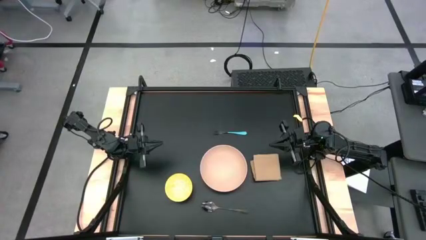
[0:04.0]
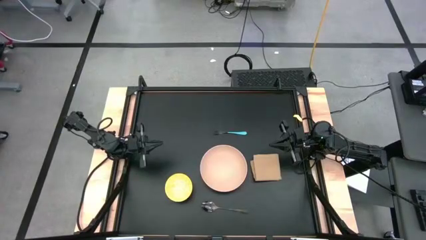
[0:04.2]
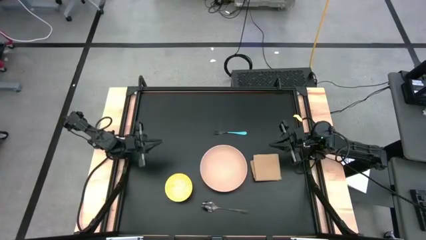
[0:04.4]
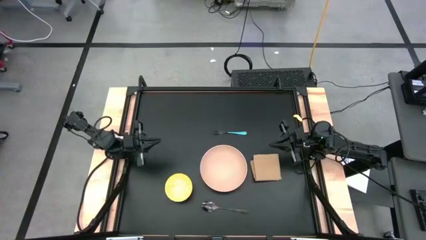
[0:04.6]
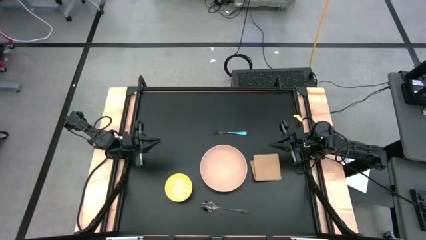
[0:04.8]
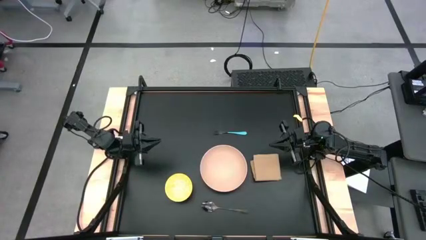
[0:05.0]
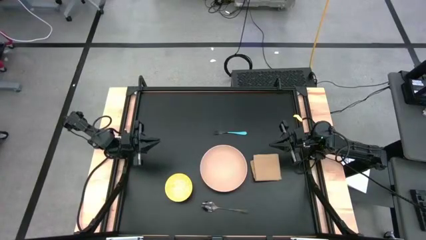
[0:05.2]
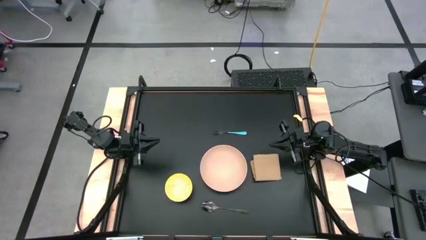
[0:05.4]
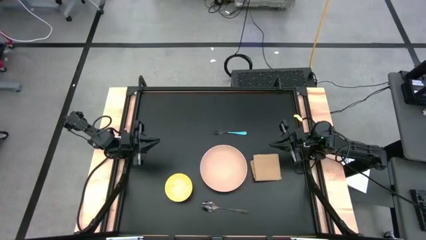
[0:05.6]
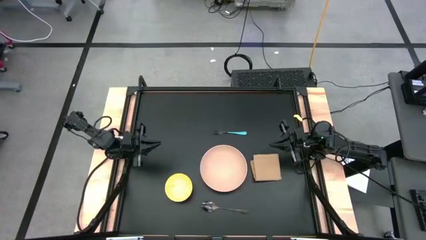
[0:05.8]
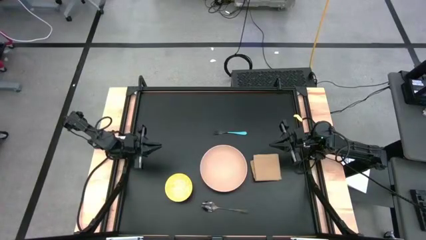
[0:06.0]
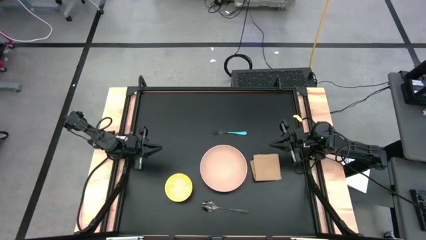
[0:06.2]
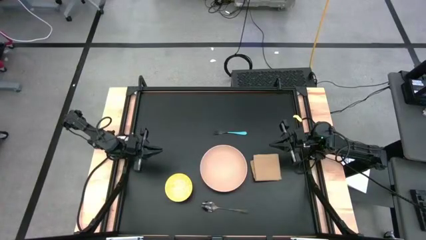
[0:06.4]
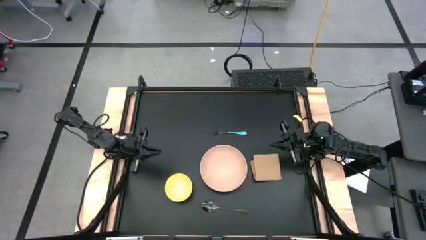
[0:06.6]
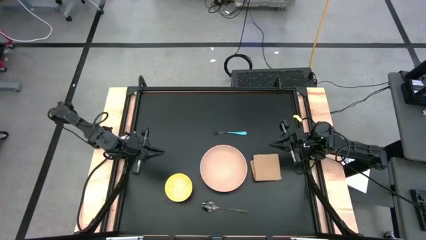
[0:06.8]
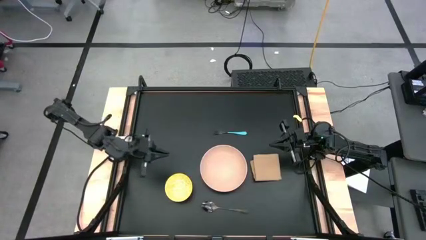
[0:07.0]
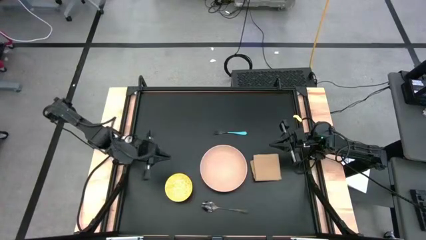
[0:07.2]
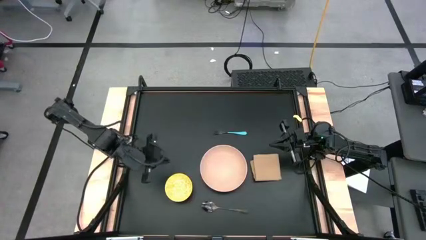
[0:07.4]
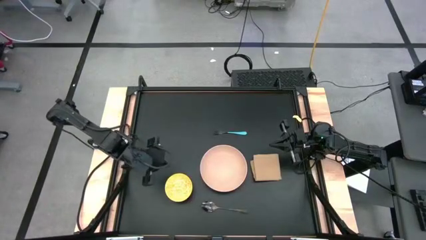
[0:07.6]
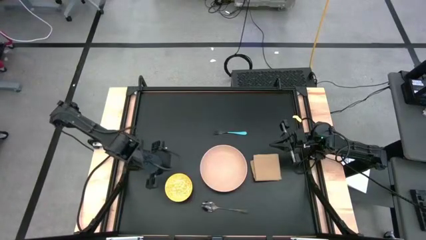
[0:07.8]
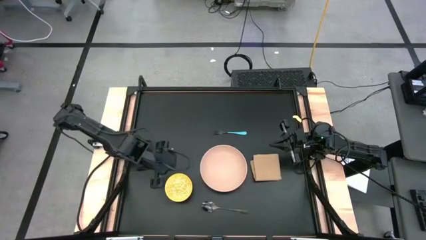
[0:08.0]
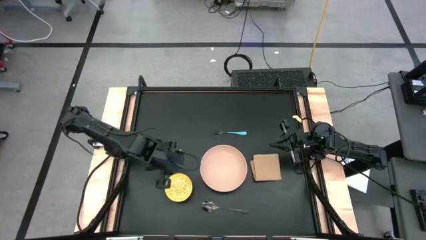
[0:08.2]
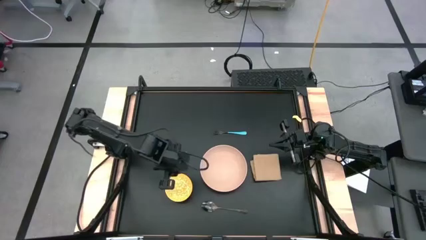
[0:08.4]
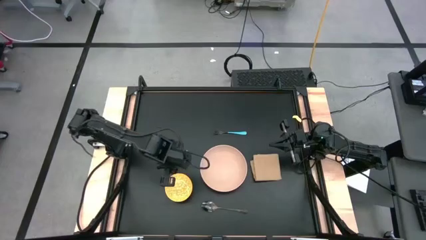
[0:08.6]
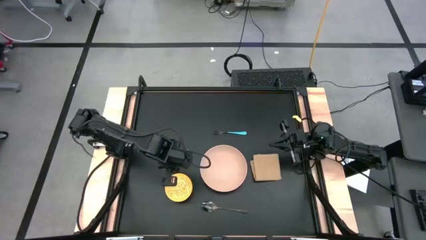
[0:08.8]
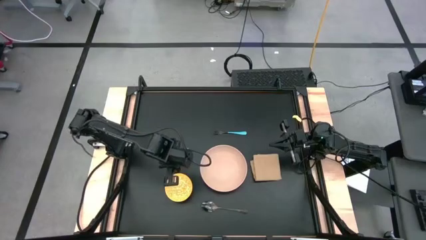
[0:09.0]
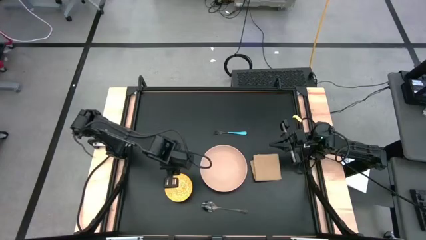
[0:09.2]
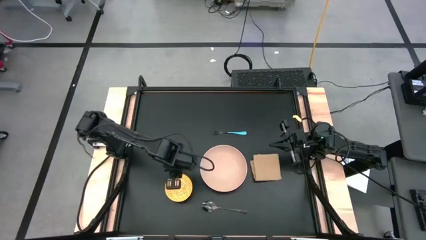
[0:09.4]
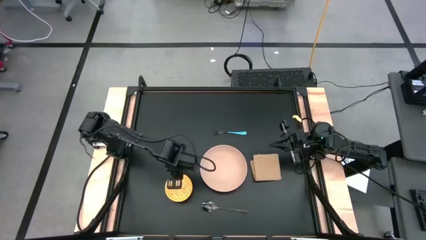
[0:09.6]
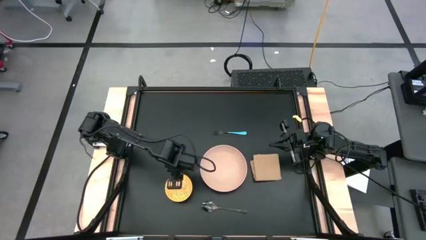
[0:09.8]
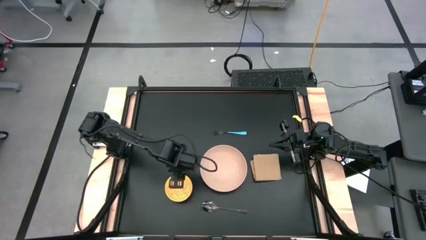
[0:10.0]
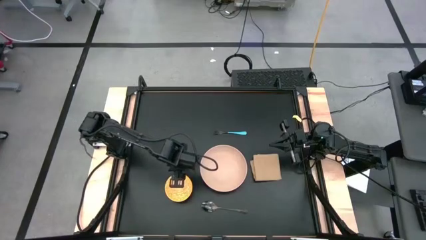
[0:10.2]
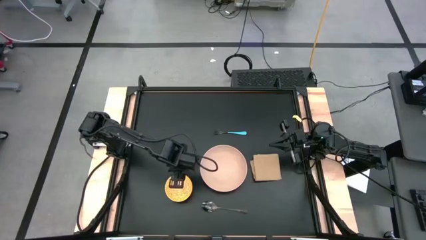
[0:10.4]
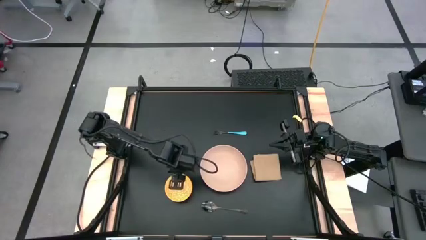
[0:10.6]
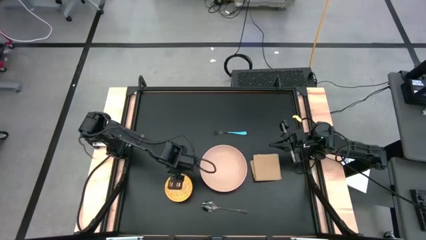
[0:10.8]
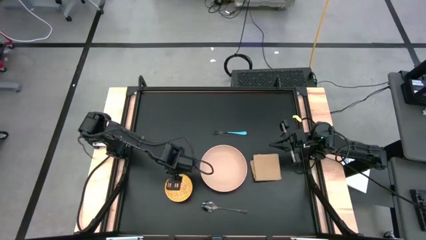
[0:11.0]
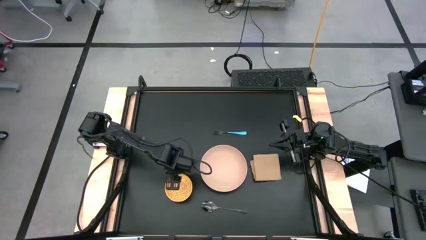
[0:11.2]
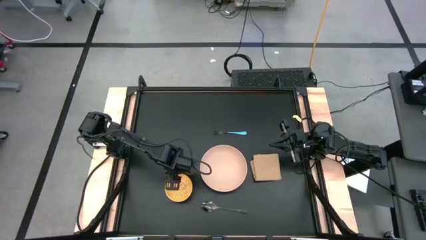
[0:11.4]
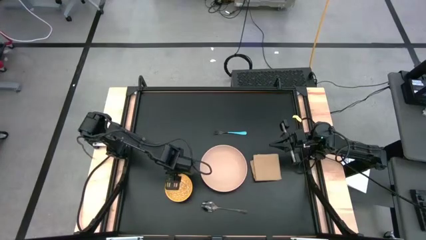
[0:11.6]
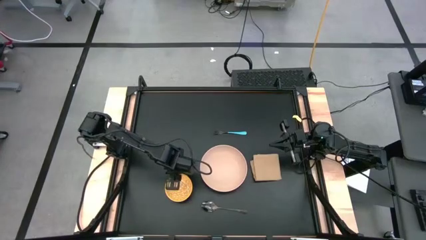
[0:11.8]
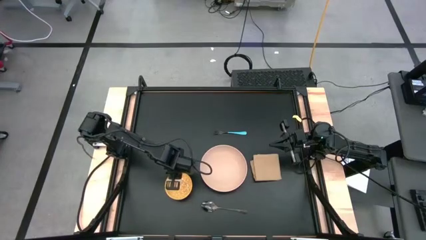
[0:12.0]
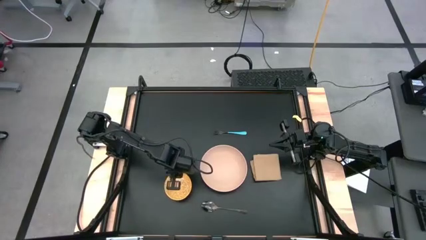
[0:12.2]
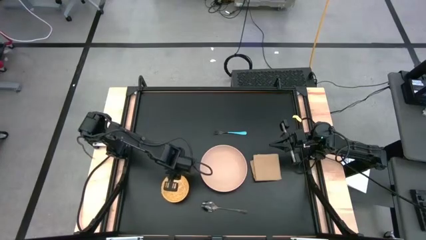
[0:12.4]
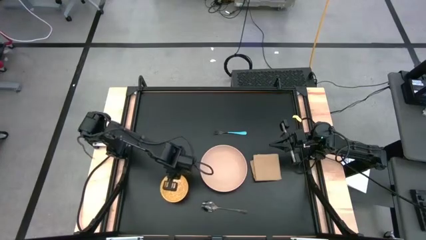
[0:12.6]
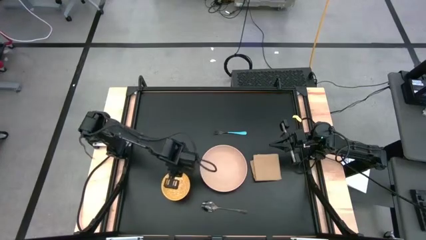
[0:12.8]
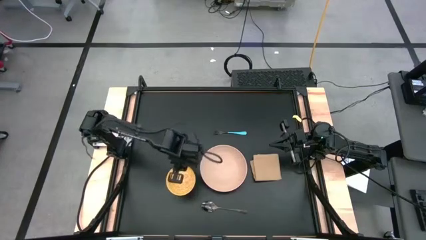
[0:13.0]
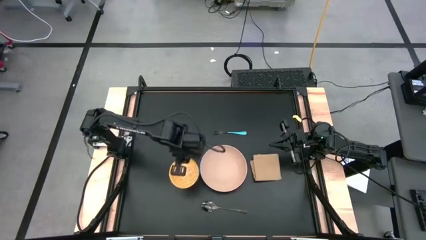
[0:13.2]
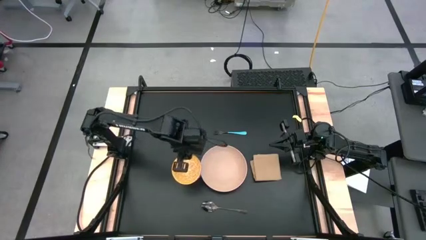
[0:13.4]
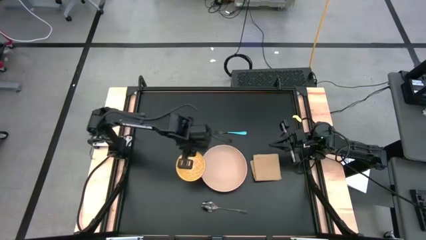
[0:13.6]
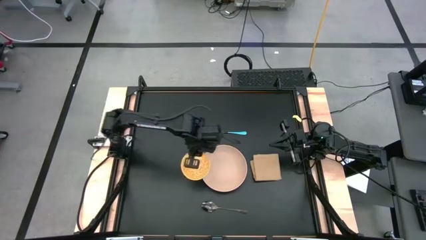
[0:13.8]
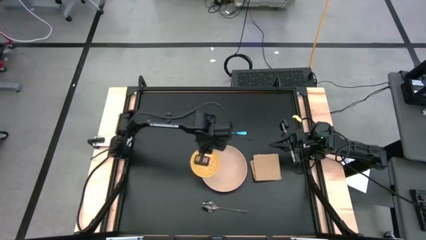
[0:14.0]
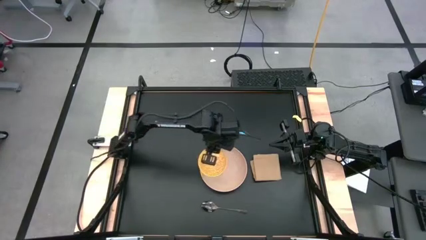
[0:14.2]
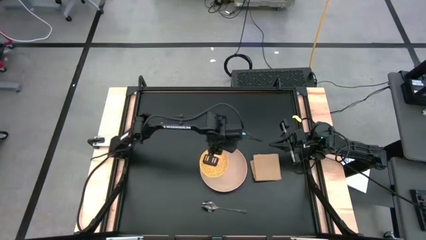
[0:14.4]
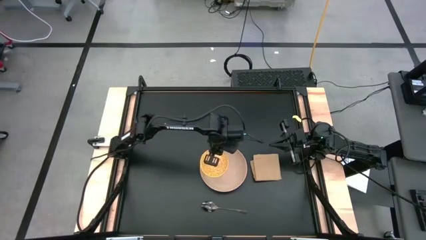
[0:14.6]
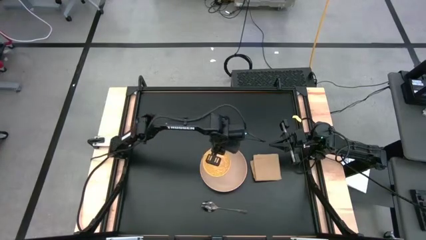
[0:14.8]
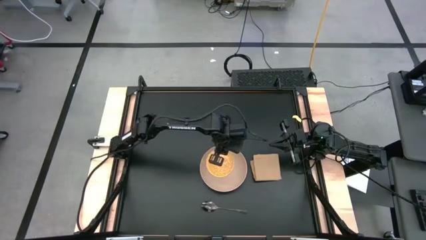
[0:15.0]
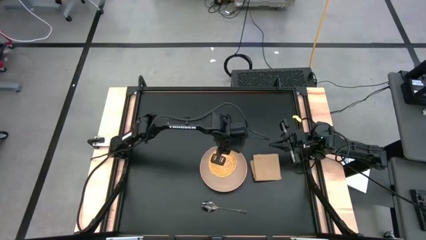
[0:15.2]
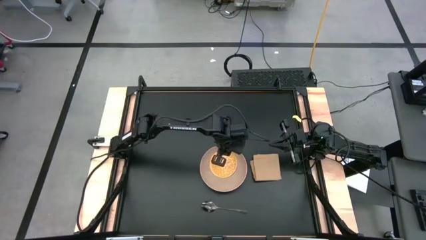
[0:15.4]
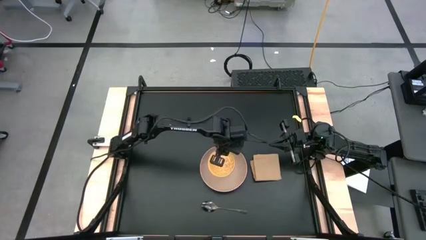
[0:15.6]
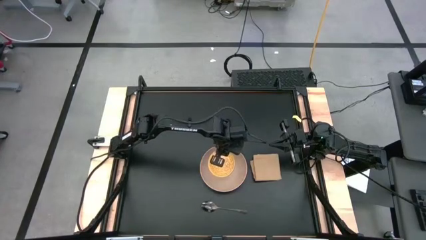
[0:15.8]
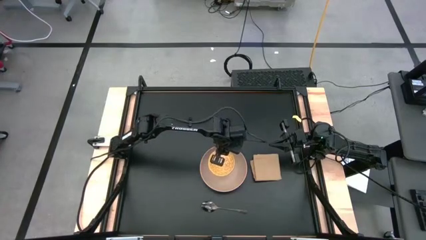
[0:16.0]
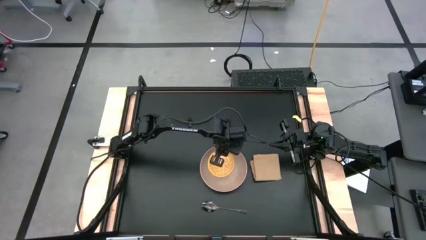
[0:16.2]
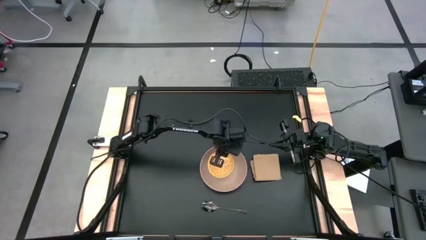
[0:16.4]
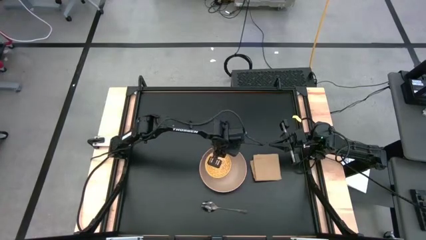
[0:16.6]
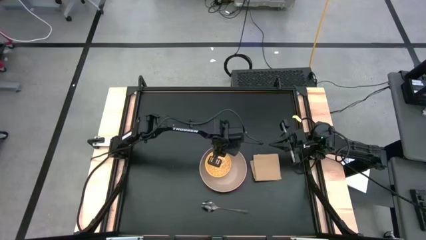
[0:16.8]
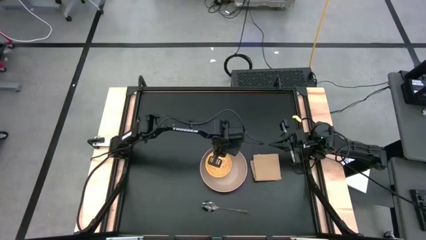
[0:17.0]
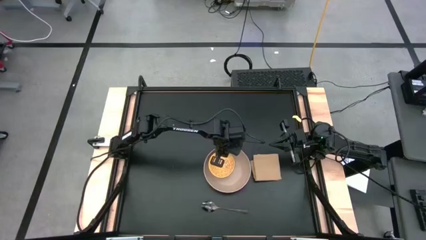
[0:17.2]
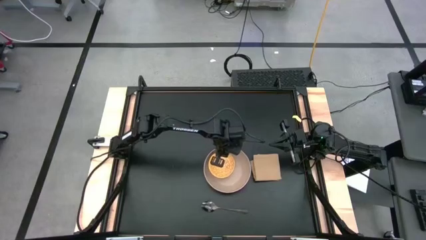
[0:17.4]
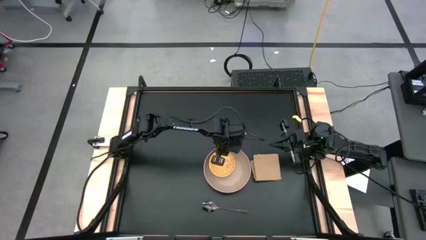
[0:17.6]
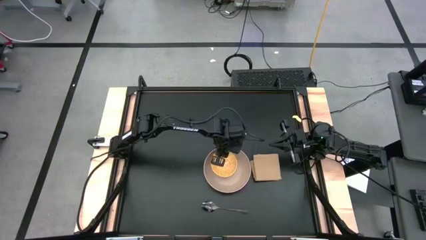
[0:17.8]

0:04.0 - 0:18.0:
Task: Set table place
Put the yellow bowl on the brown plate
